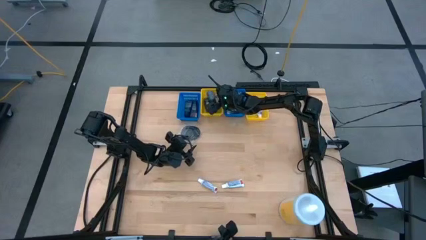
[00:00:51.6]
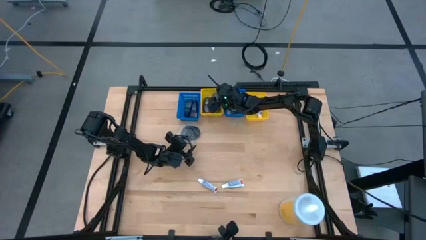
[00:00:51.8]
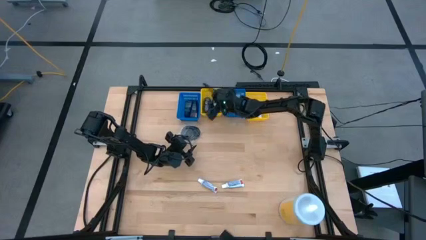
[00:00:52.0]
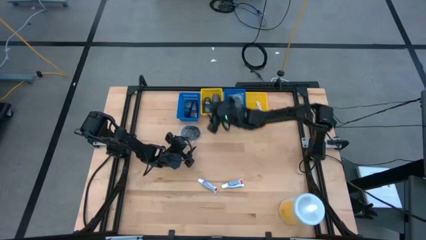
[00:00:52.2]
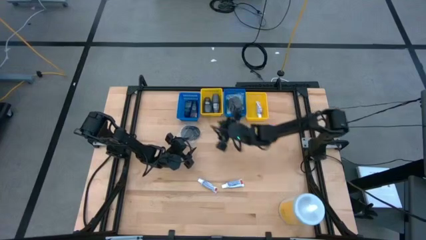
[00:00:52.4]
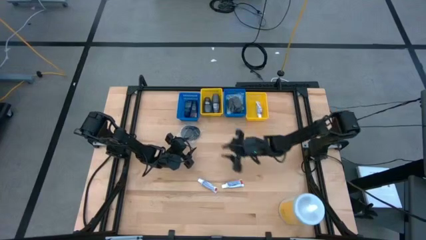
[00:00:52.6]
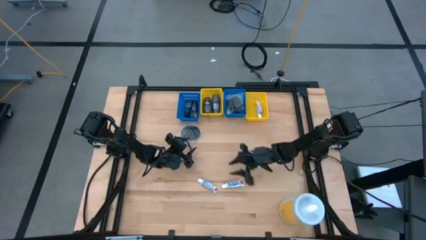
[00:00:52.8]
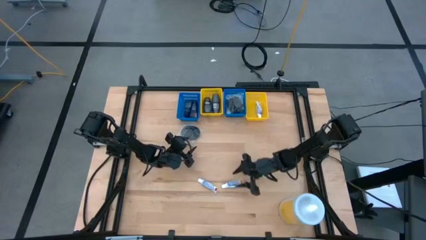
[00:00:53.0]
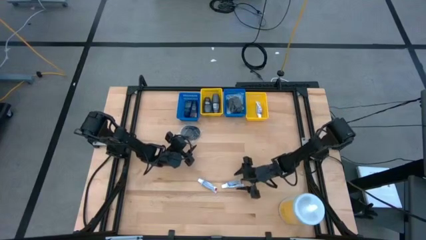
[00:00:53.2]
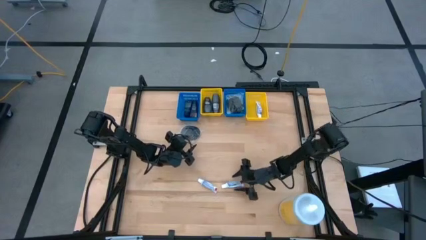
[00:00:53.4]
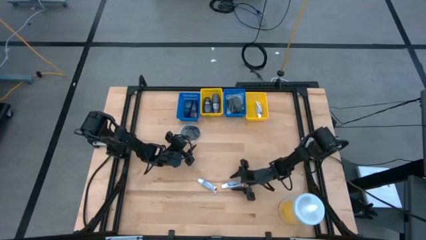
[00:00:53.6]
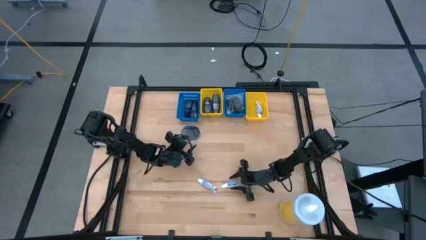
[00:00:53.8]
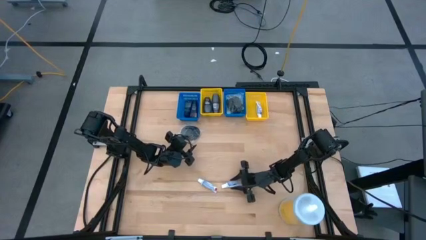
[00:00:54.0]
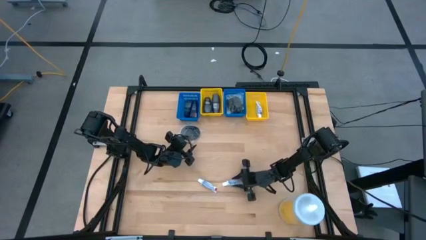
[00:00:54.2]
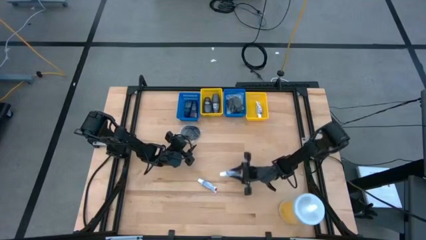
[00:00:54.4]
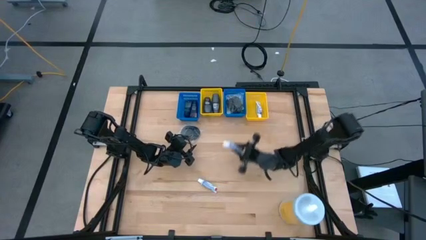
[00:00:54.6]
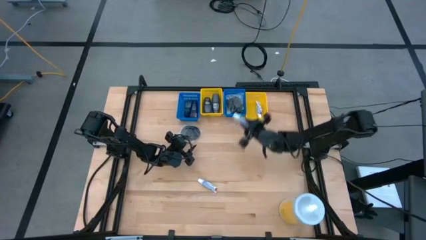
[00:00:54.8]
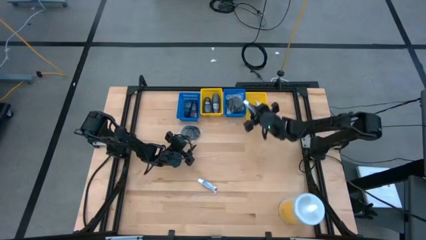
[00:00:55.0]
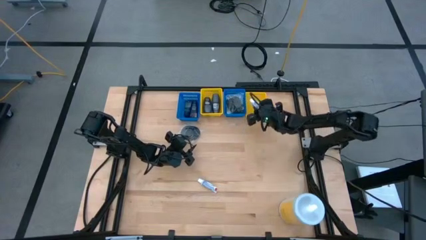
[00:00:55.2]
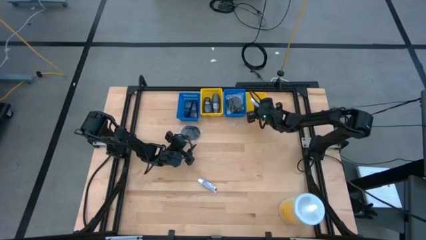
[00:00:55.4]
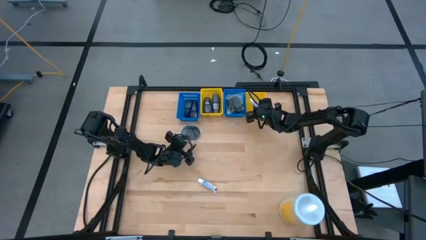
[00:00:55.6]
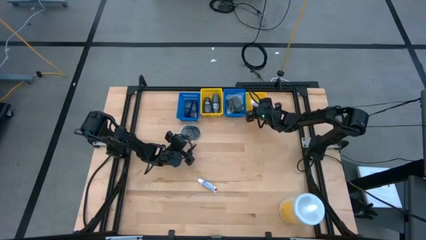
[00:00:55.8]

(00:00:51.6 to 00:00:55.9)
Task: Pick & Place Travel size toiletries
Put the white toothpaste into the right yellow bin

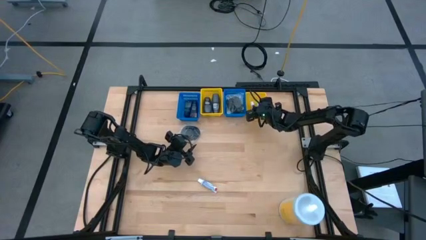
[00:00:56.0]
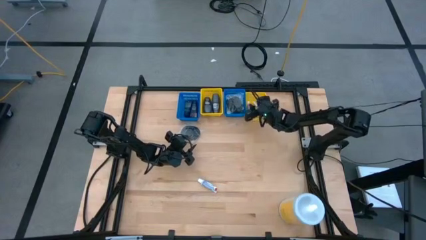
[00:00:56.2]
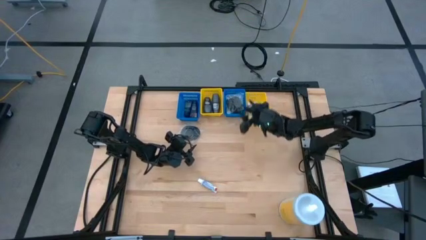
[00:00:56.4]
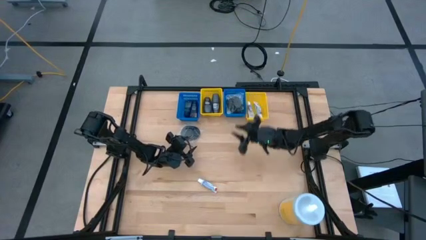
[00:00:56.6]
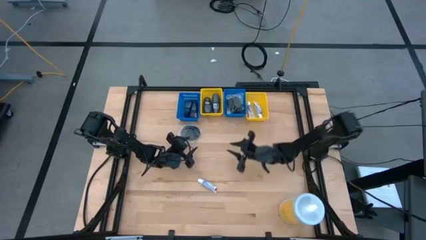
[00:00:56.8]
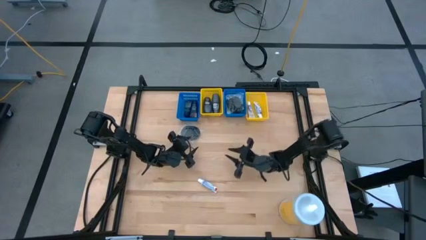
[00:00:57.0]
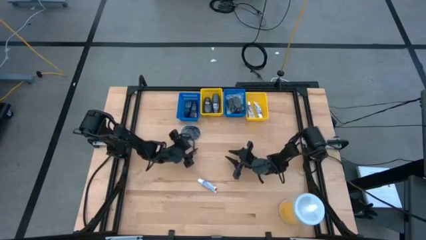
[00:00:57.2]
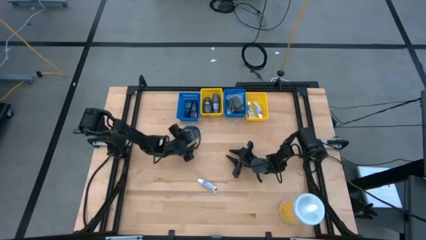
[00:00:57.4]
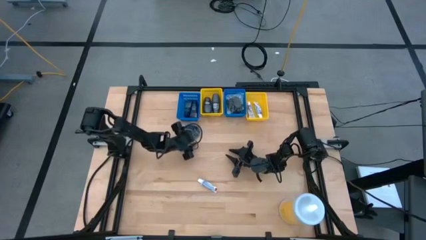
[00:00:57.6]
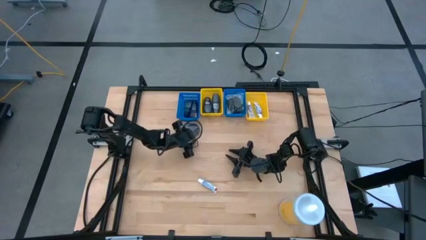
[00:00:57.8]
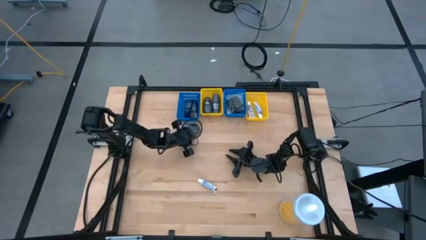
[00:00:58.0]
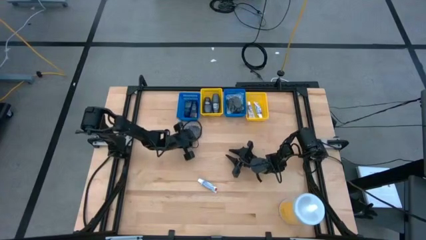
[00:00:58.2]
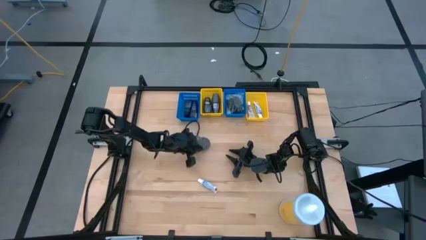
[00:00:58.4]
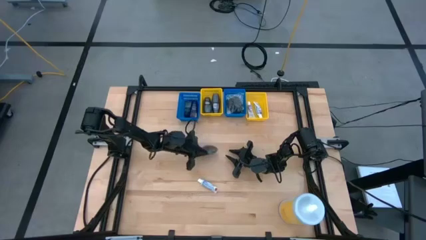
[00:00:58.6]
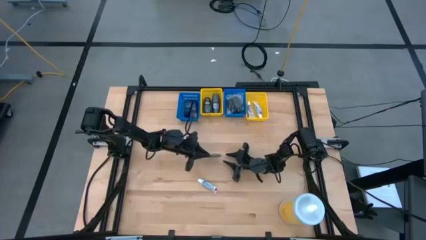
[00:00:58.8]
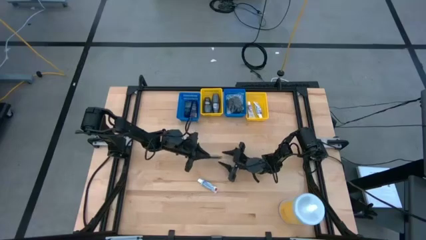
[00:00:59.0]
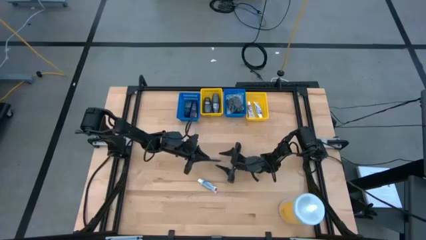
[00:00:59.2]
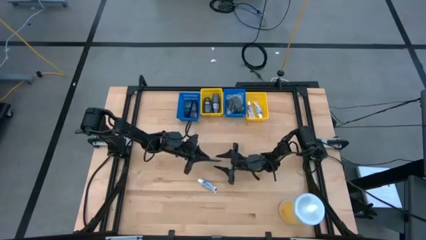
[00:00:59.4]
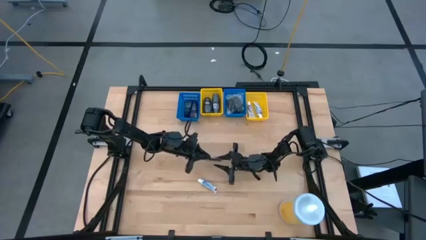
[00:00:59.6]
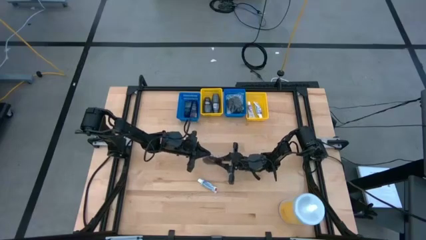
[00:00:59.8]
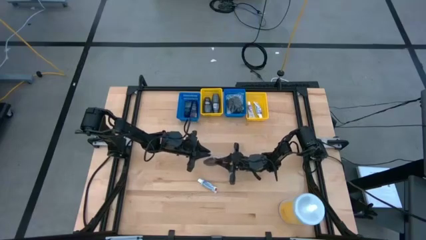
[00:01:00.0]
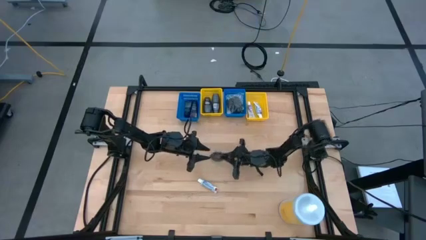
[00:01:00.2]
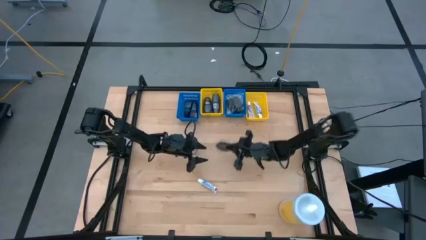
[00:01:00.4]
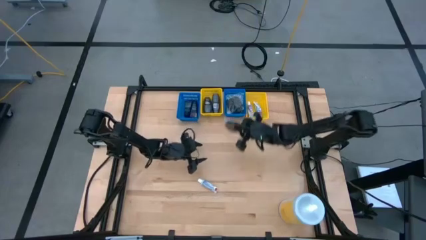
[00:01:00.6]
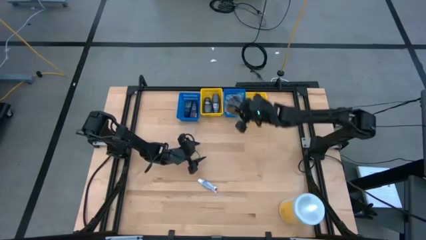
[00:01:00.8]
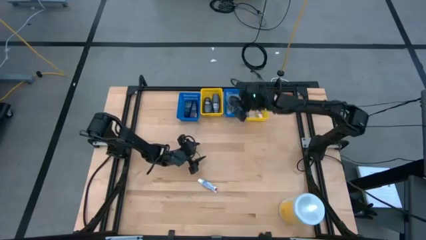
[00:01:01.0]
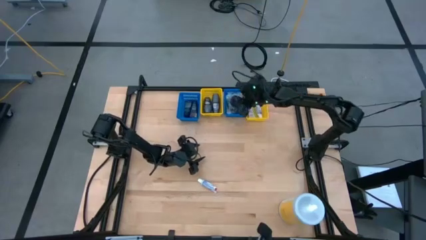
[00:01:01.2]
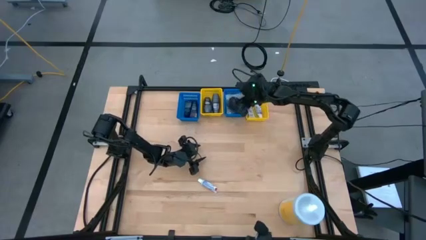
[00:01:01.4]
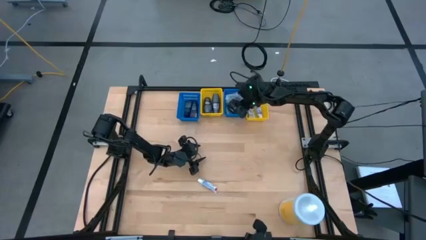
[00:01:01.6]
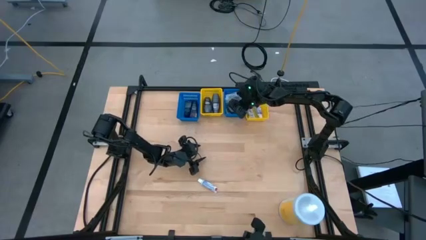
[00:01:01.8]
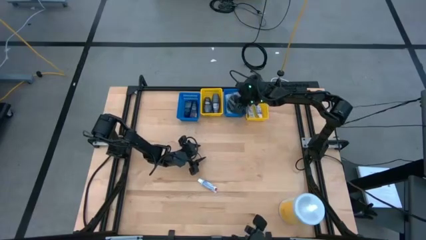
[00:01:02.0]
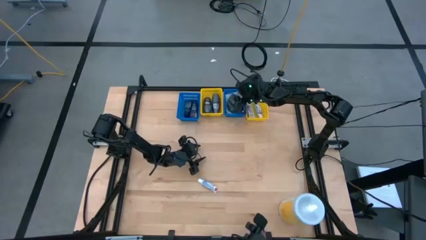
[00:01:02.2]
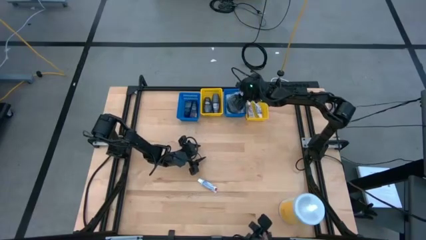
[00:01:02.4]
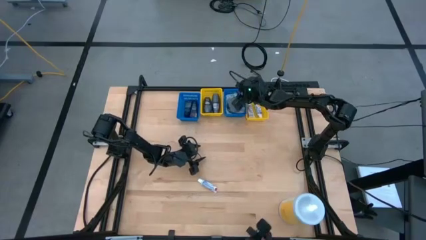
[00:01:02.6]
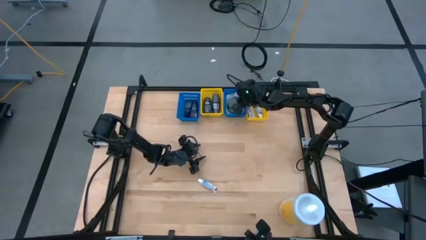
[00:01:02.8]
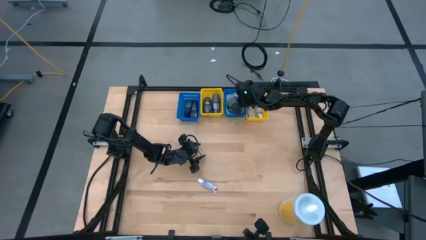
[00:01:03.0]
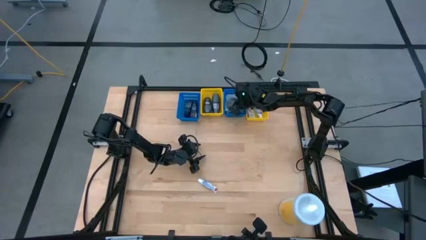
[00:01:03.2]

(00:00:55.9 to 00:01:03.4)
Put the black hairbrush into the right blue bin

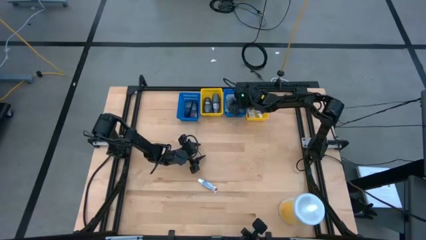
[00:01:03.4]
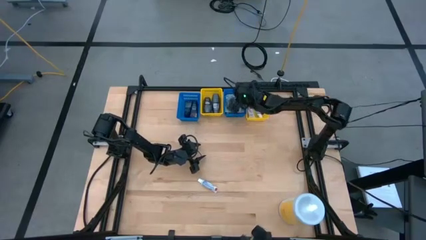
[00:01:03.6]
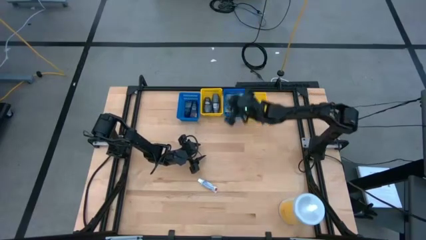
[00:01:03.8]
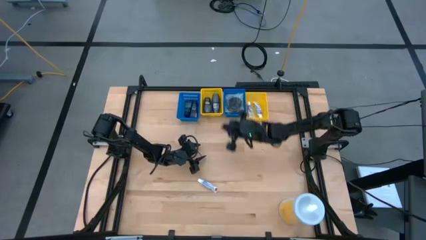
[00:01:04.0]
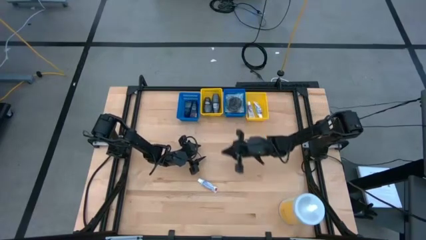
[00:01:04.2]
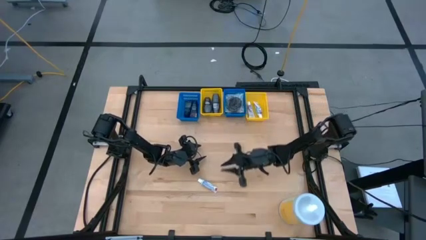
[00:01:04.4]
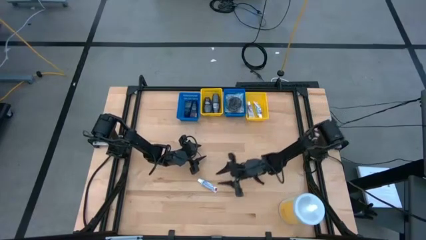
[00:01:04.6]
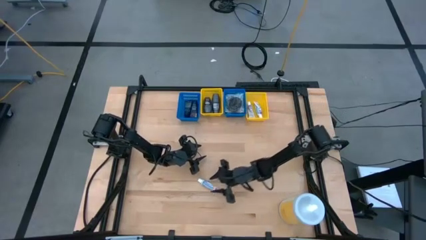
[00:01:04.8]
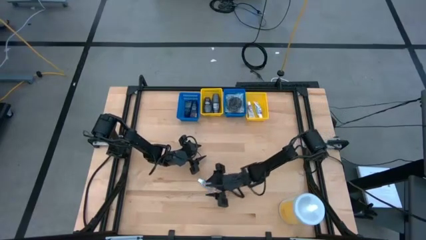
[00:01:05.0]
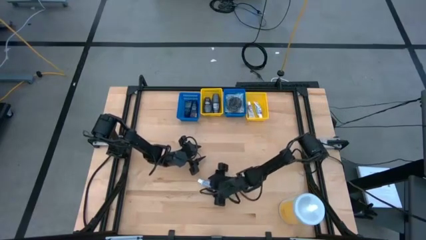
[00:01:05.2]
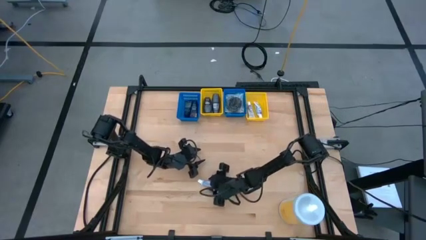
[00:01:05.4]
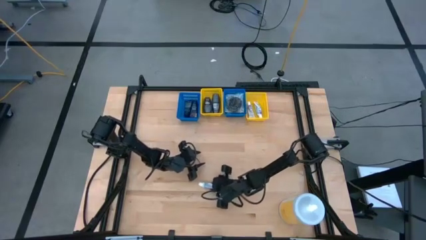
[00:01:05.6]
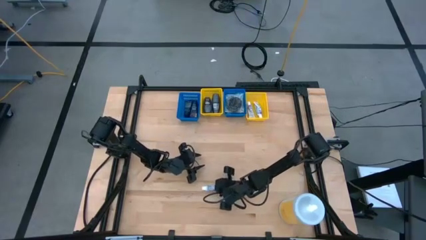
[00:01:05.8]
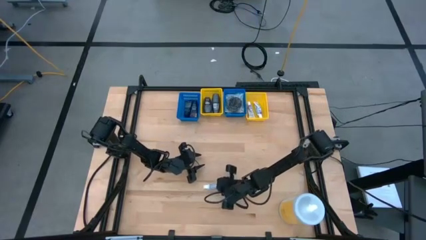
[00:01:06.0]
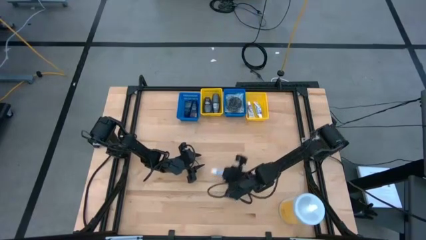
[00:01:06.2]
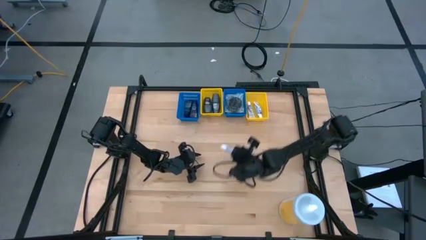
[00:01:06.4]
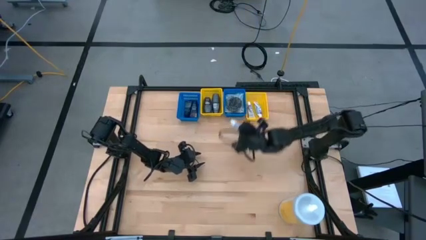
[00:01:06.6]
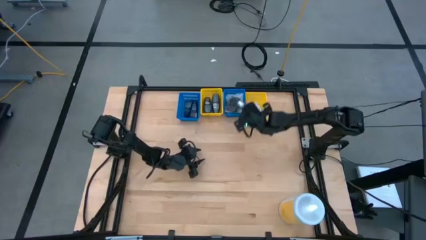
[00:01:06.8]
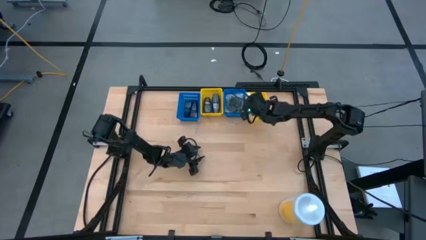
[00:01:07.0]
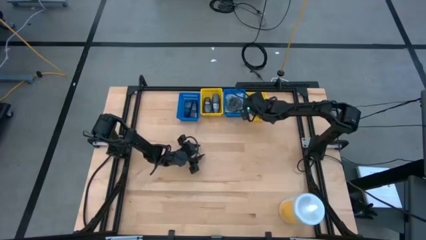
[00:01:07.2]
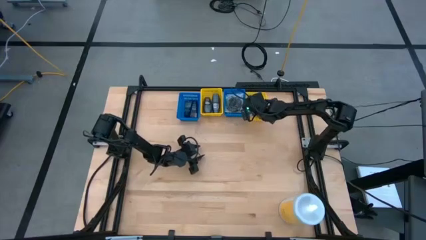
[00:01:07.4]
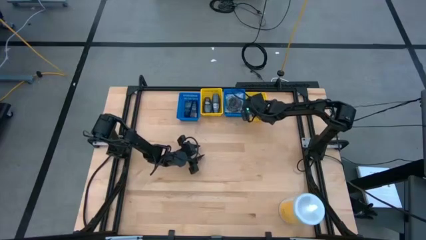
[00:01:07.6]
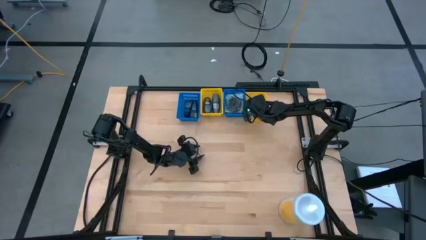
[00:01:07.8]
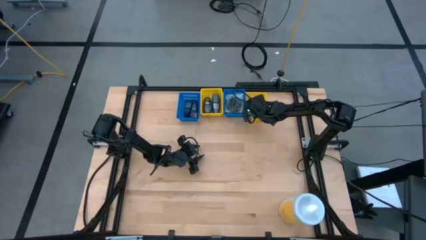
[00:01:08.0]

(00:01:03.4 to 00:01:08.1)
Put the white toothpaste into the right yellow bin
